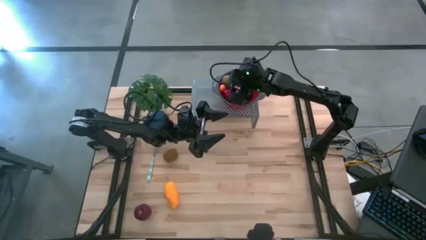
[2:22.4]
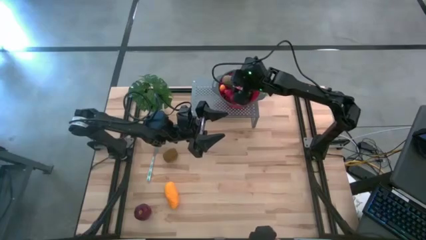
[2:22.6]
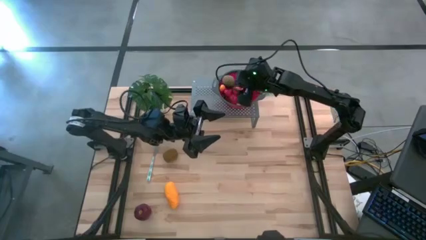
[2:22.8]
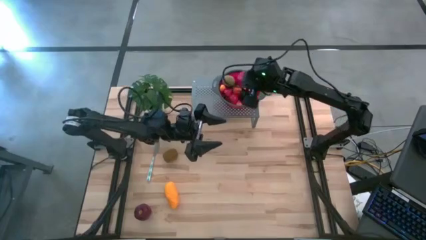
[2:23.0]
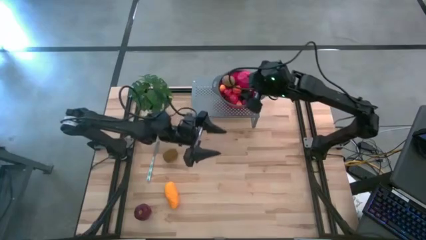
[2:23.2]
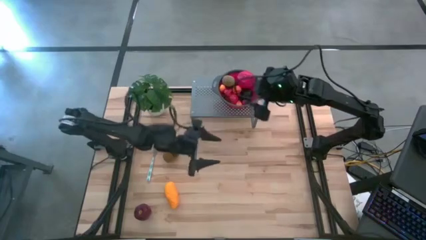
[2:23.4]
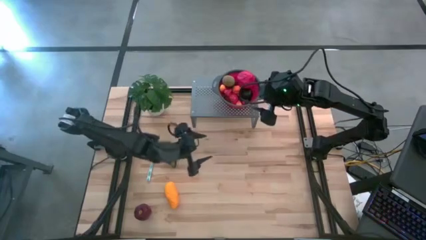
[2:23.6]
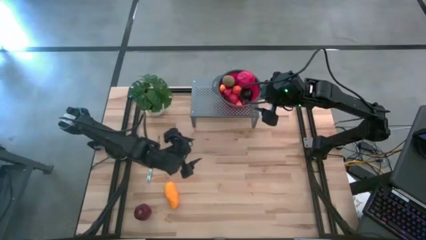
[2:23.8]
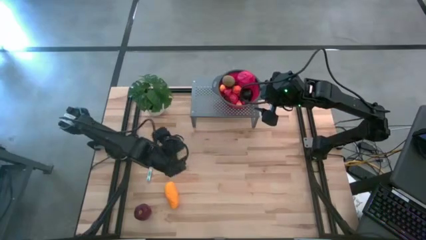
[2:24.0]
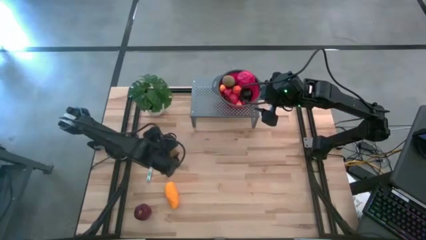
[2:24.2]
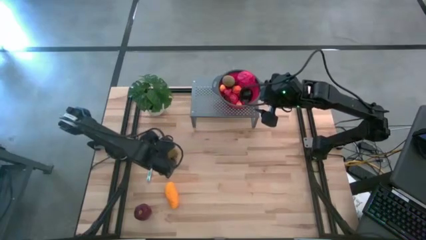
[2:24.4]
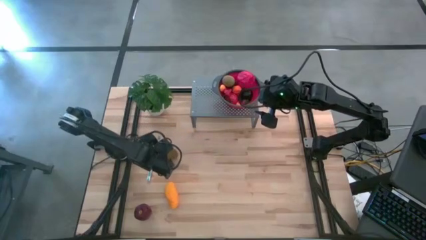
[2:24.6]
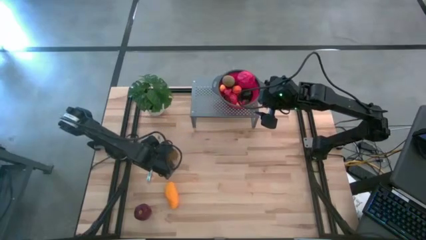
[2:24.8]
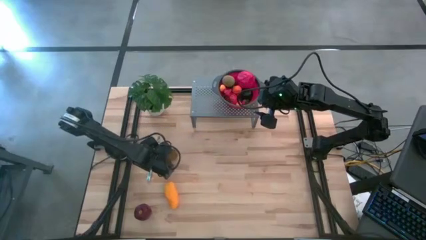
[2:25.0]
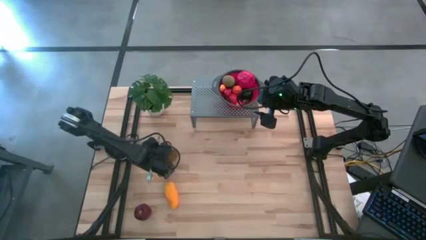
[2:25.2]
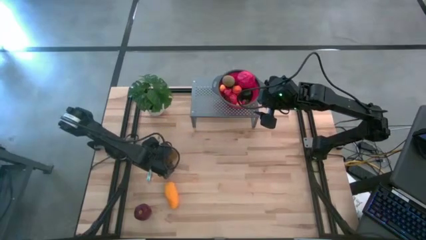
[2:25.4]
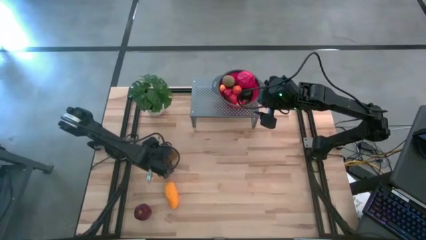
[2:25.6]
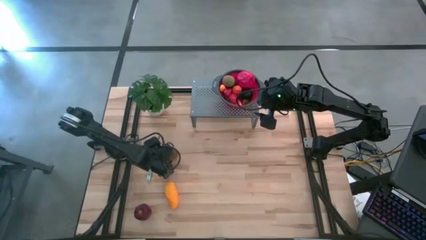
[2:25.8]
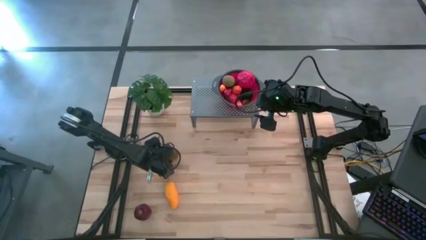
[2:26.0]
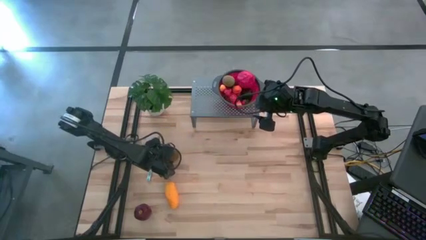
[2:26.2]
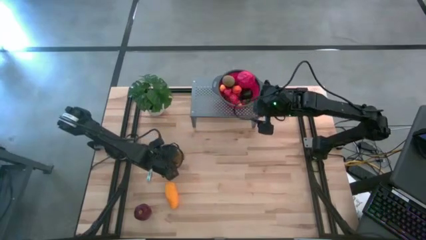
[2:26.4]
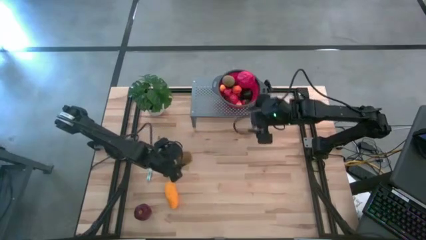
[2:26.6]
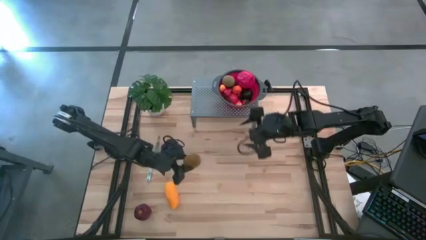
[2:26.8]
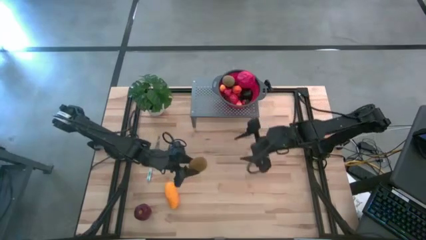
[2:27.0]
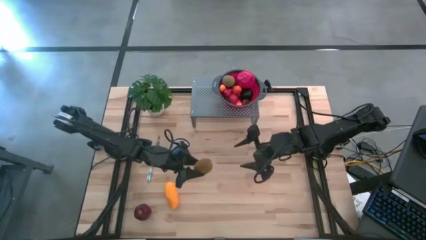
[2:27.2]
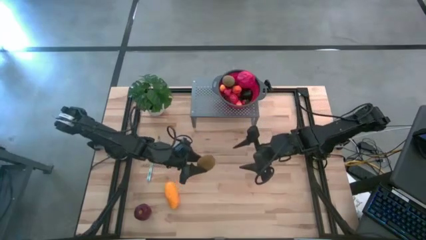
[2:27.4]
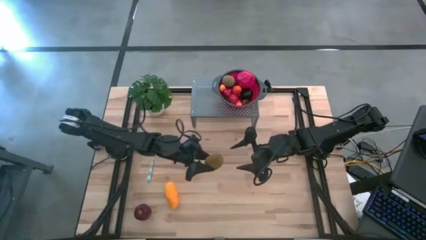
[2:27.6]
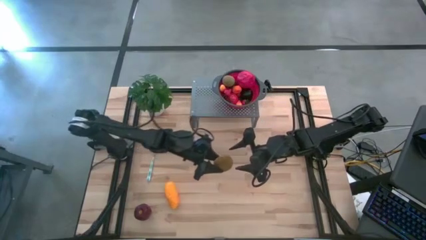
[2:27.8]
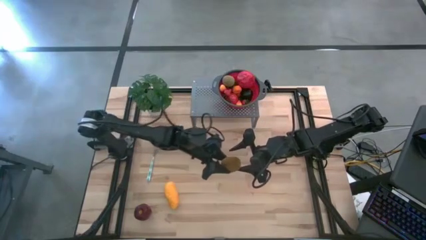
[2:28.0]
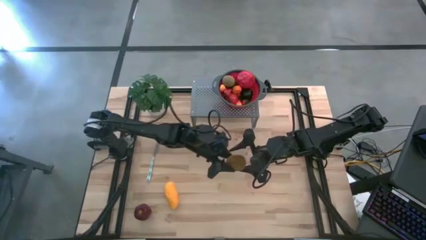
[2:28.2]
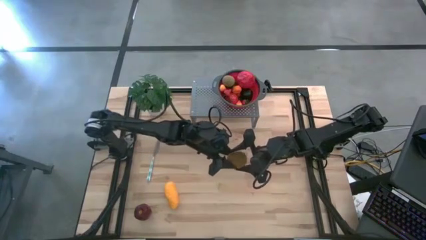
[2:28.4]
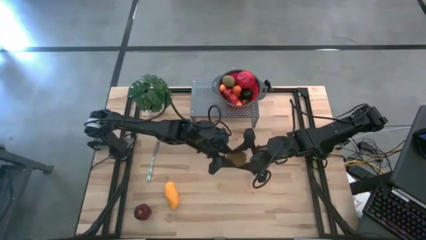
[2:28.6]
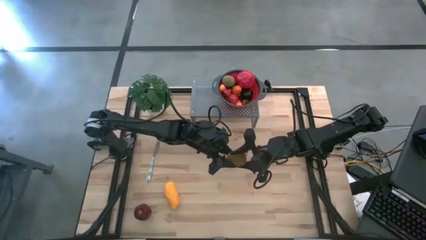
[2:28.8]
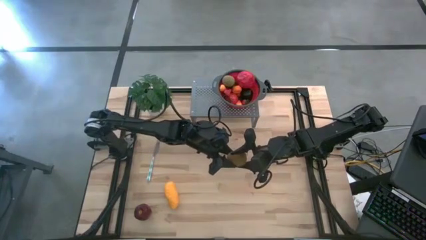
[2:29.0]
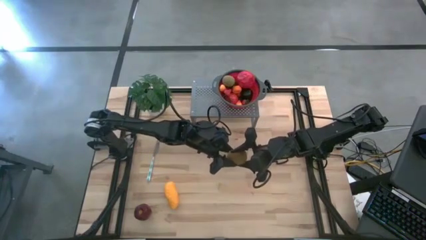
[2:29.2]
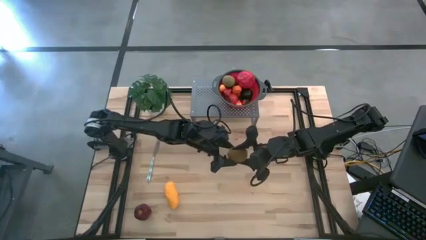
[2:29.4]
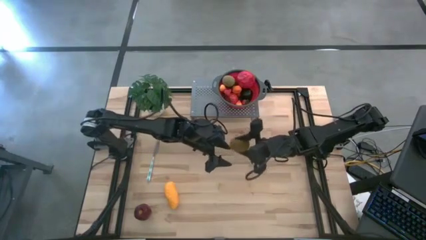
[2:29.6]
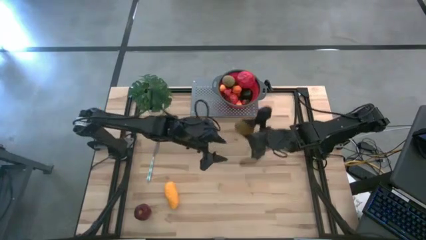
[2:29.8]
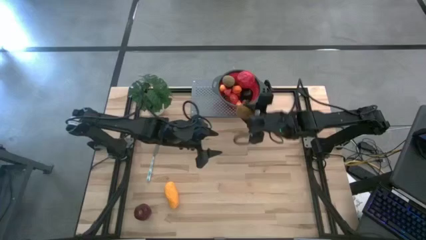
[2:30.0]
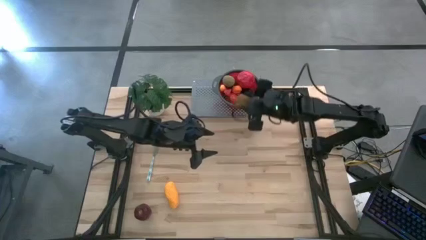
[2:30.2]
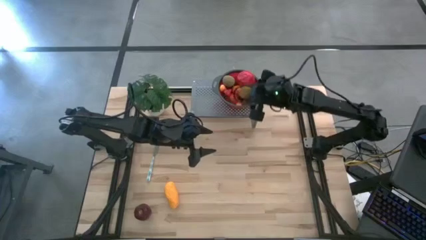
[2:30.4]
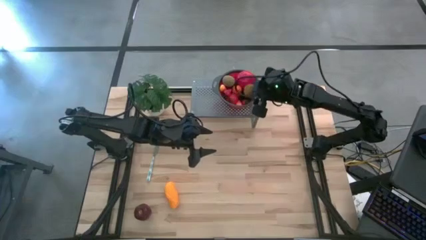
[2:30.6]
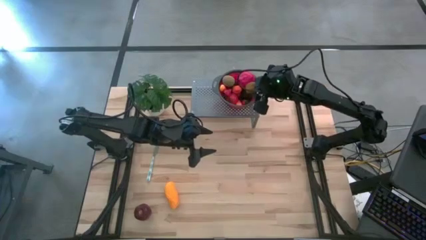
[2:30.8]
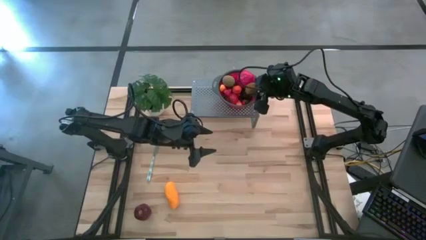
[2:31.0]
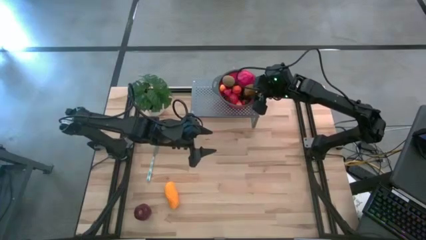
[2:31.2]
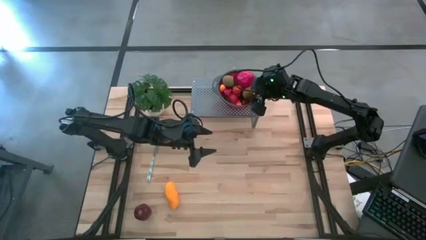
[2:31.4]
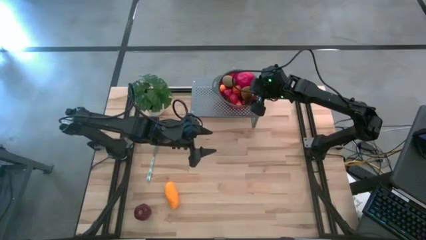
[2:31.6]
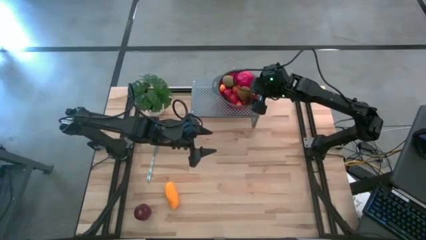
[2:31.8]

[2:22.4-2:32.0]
Task: Pick & Place Fruit
Put the kiwi into the strainer bowl on the shelf

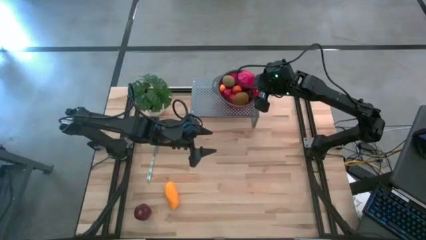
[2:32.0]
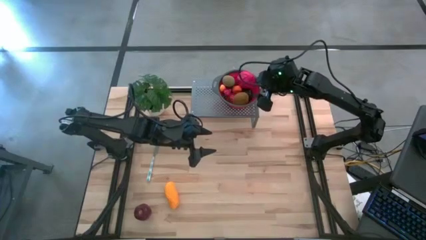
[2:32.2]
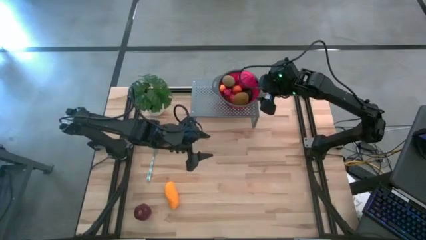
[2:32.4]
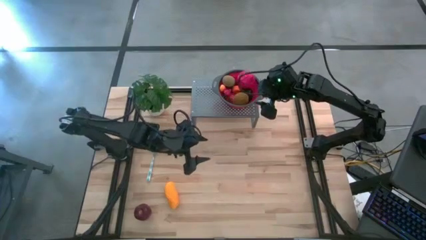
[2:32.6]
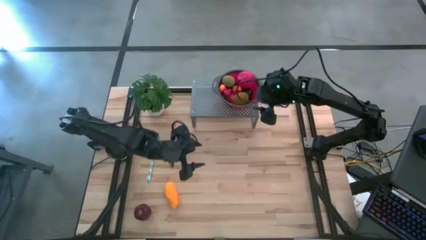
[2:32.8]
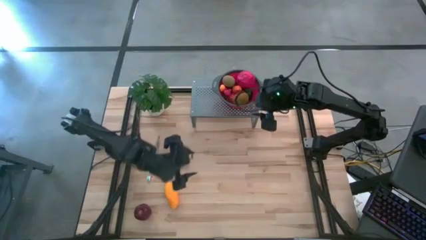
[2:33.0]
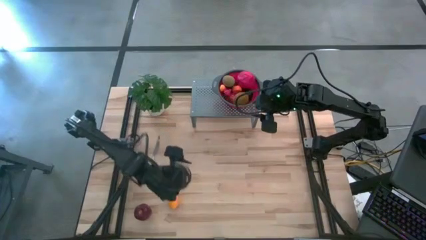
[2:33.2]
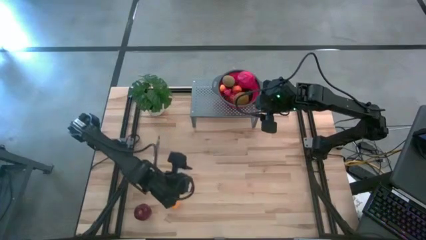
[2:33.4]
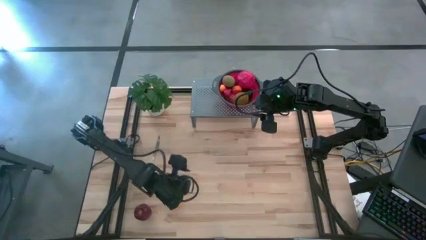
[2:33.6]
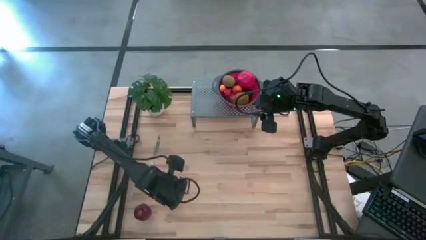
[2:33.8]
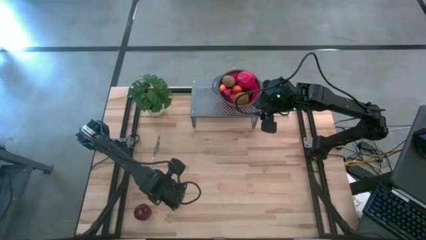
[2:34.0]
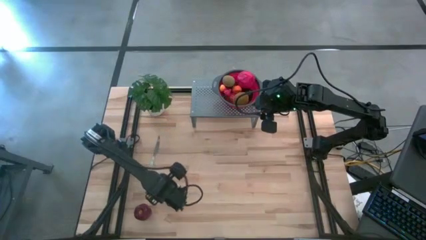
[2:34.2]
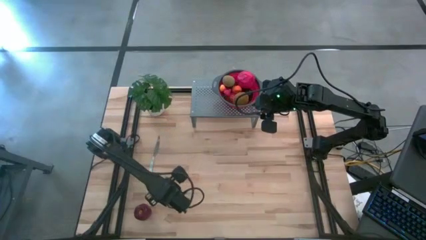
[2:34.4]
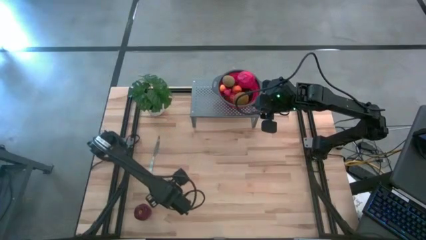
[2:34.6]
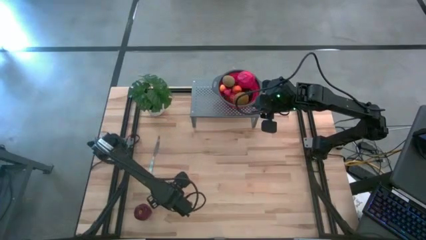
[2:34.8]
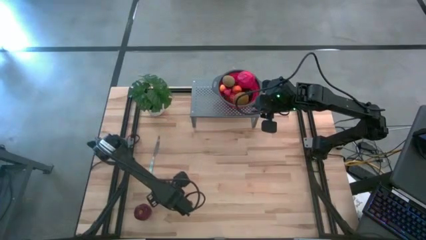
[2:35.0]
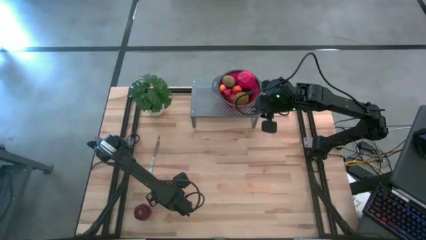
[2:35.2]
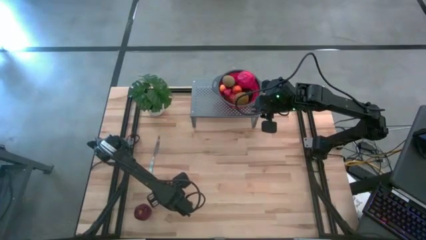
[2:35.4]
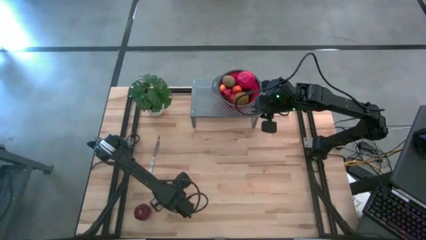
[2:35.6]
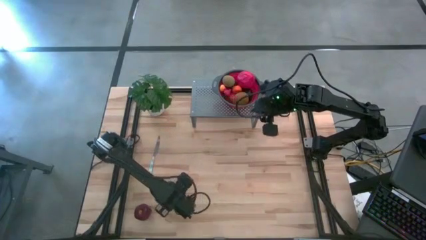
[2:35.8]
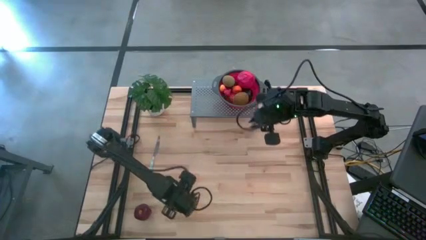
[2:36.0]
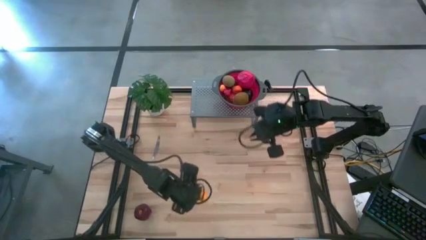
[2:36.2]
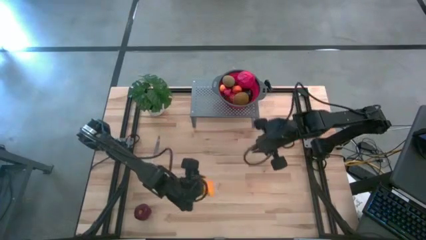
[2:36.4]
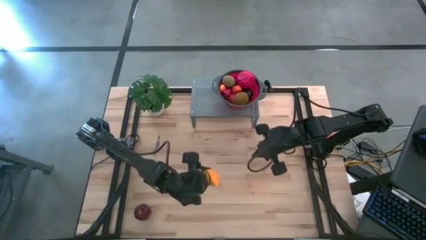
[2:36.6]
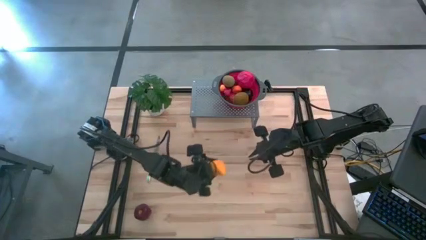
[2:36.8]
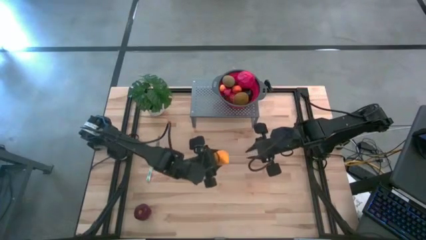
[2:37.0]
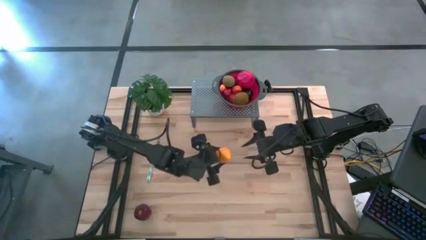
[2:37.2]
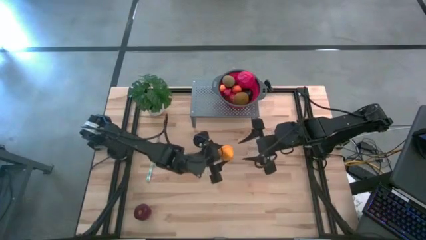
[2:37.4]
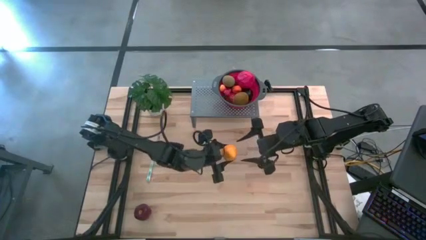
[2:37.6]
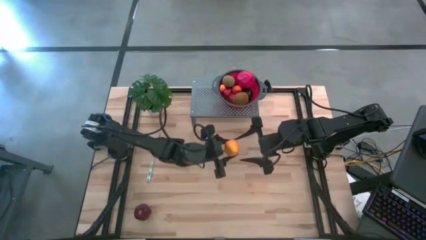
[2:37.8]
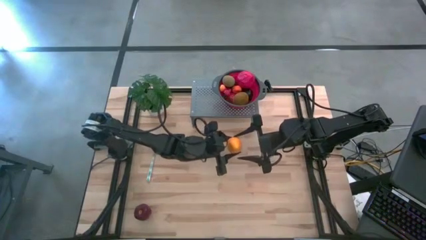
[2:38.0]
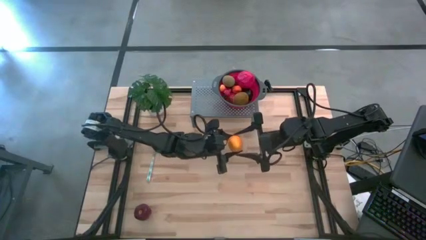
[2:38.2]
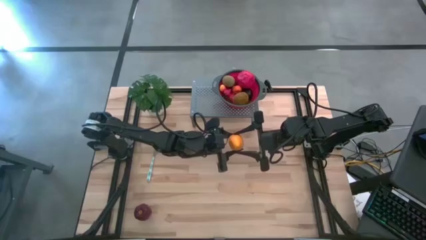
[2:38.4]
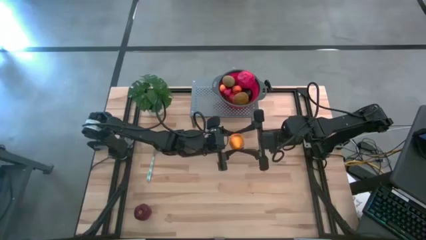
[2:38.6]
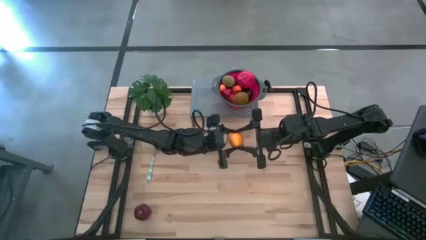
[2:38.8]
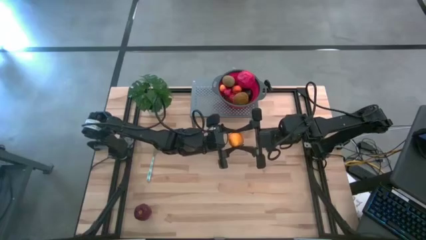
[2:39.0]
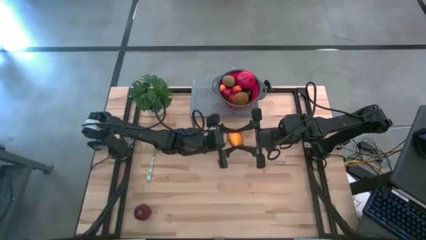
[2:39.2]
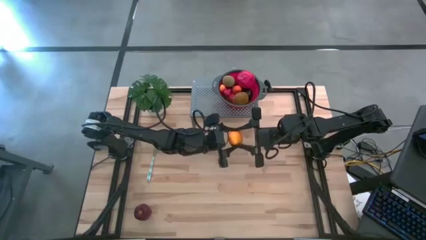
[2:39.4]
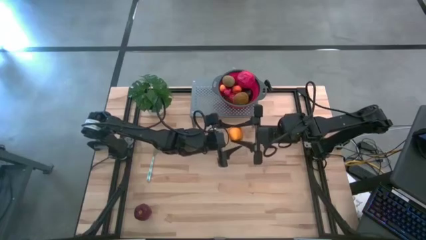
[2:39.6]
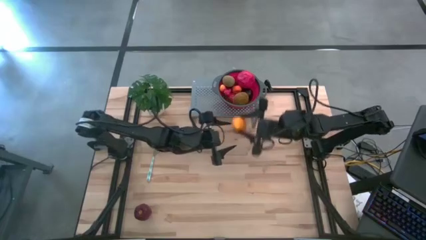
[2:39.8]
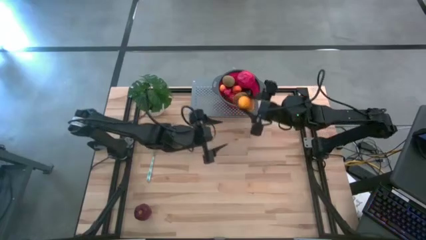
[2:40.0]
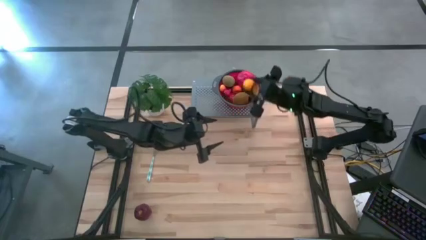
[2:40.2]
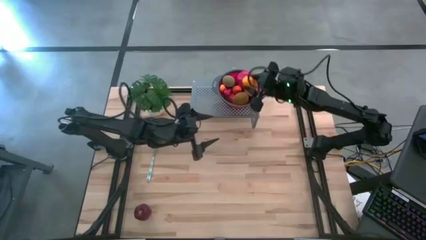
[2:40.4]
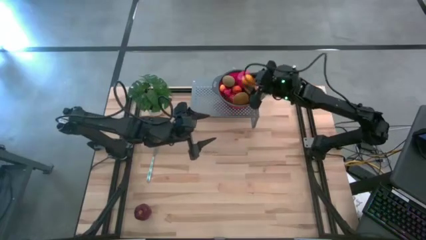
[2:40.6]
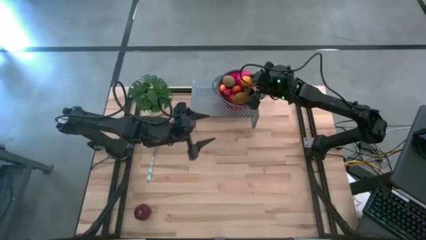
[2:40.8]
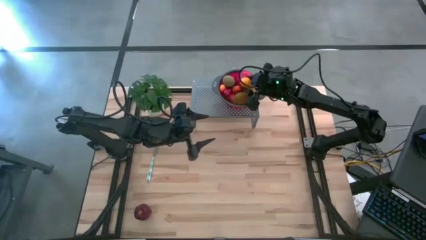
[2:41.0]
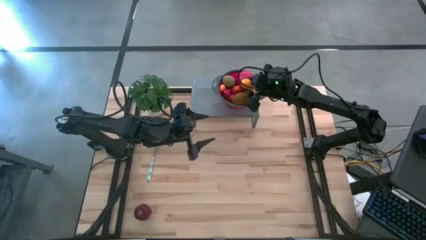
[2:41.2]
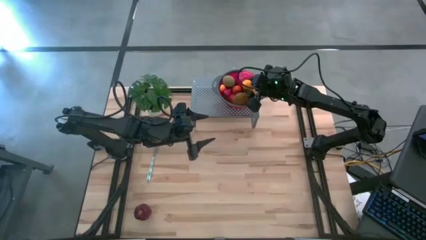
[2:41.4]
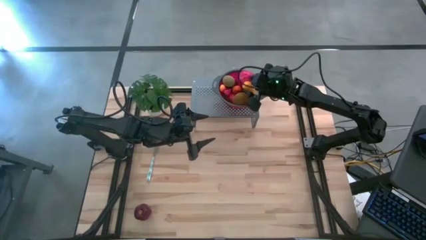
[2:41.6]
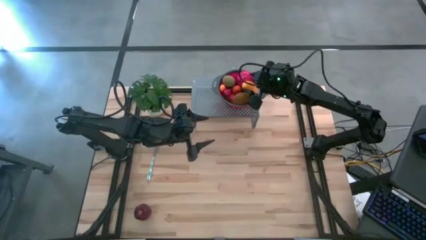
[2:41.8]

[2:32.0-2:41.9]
Put the mango into the strainer bowl on the shelf
